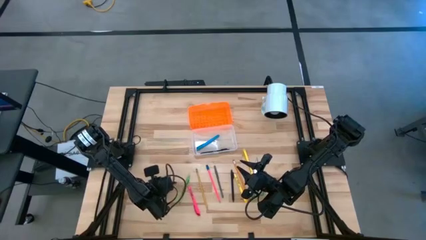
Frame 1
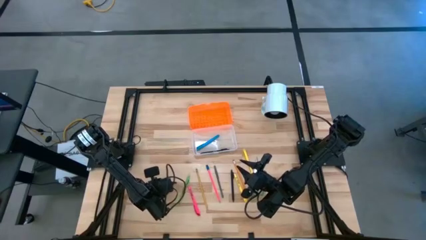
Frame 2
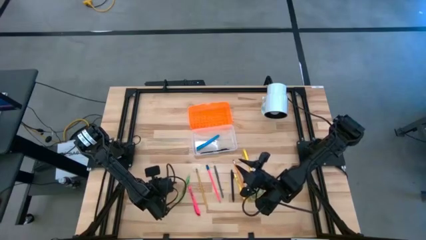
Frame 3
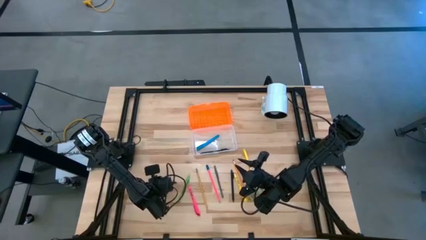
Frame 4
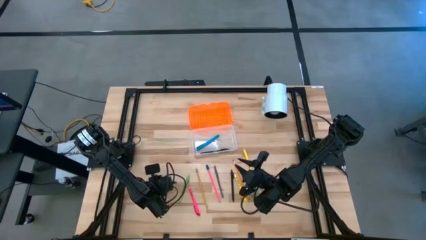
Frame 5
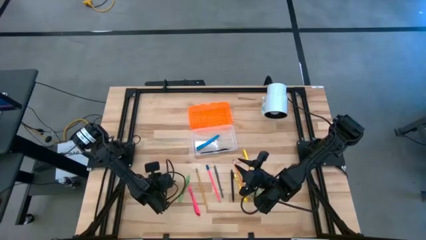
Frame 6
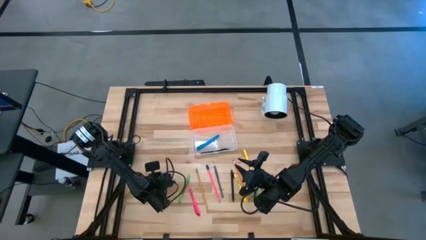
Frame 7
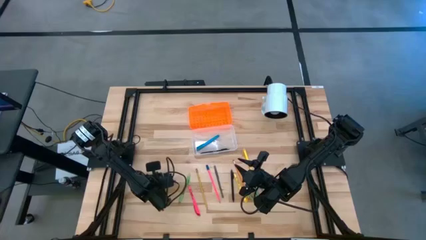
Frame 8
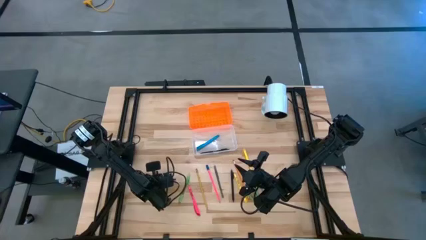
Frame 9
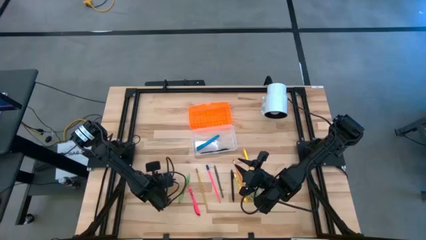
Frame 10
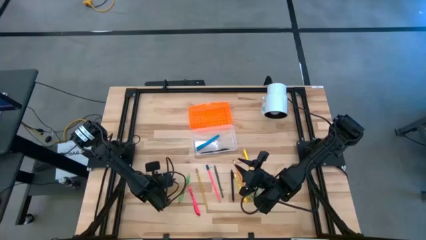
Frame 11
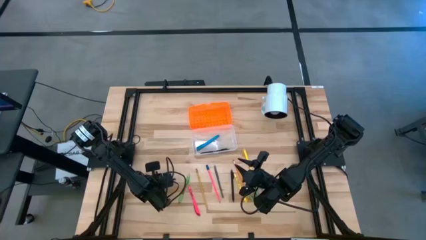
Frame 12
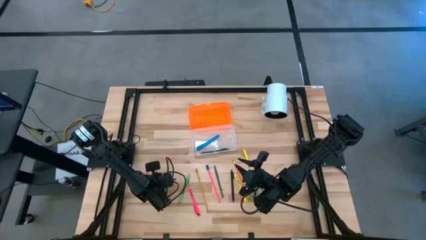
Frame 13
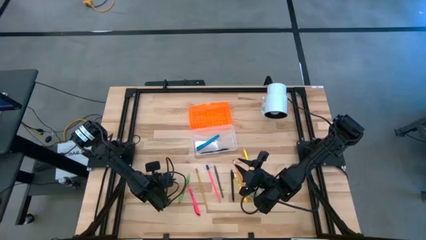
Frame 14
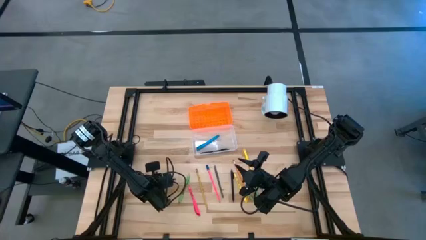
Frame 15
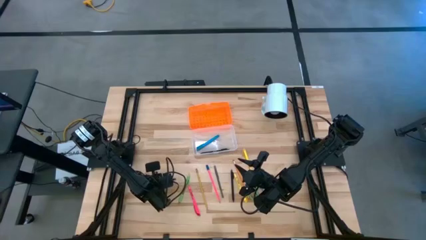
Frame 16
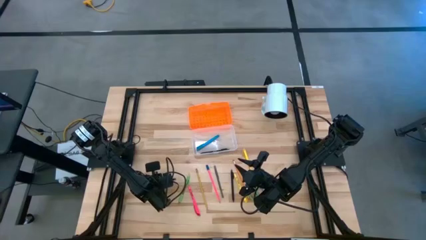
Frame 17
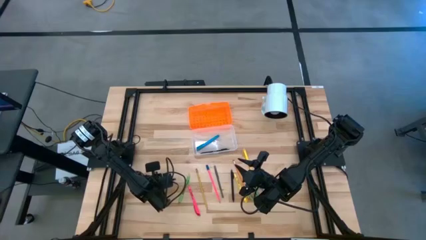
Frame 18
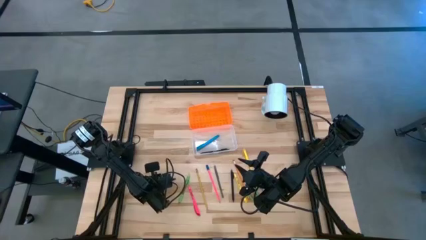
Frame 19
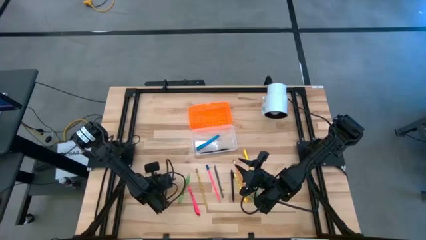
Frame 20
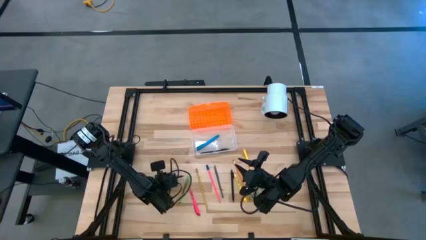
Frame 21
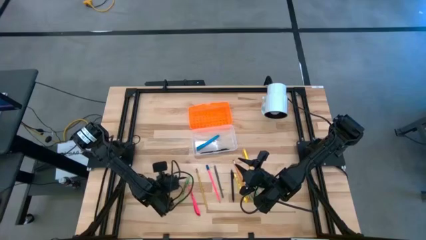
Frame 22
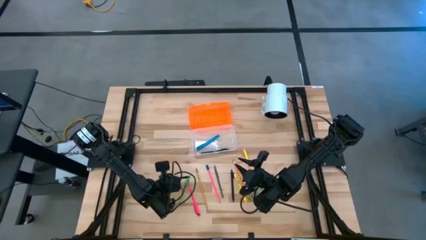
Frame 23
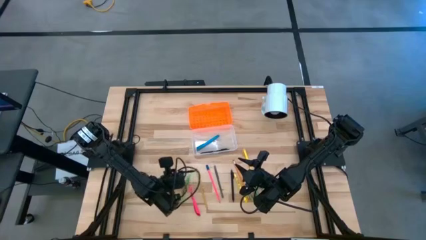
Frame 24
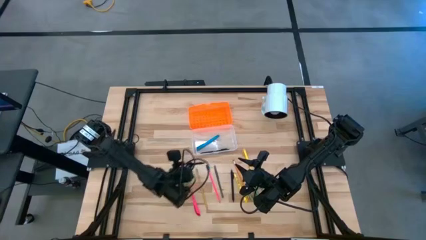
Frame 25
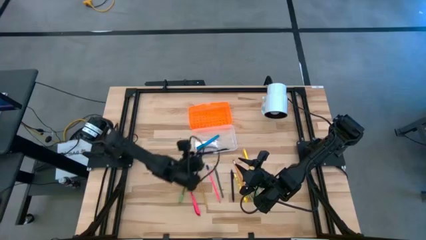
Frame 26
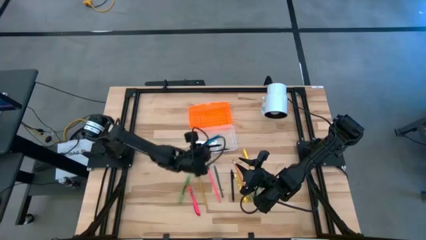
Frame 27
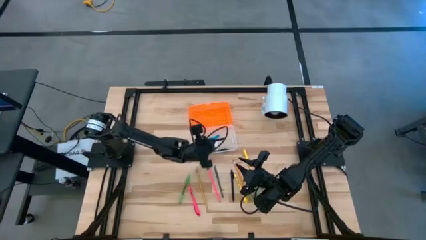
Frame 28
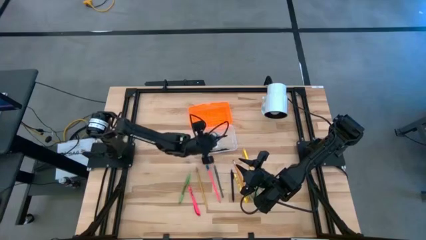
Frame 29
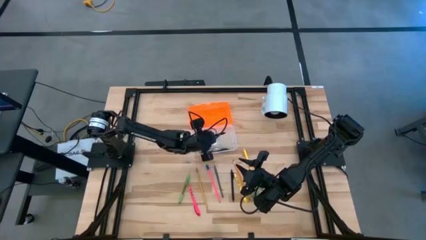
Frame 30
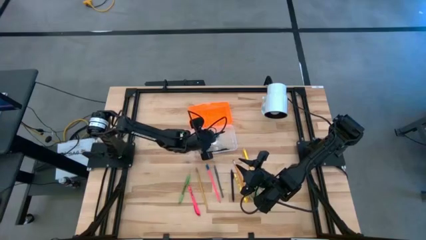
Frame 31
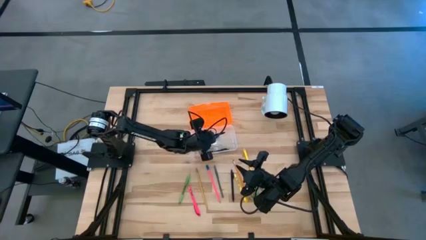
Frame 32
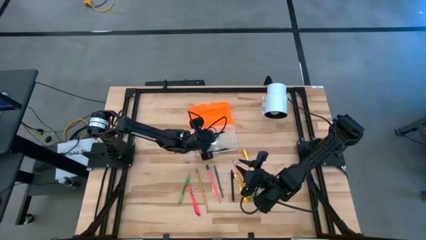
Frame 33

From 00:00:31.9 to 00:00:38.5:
Task: Pick & place school supplies into a supply box
Put the left black pen into the supply box

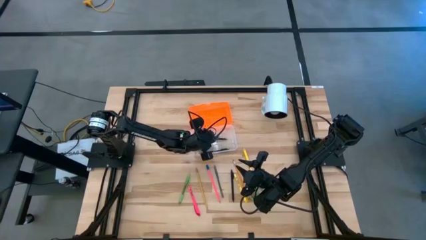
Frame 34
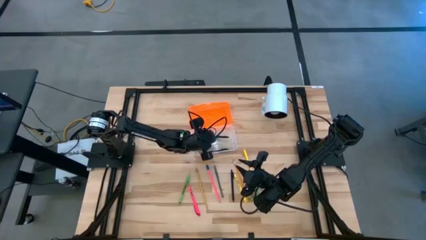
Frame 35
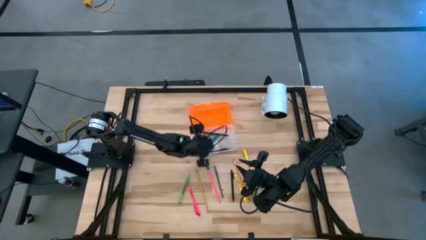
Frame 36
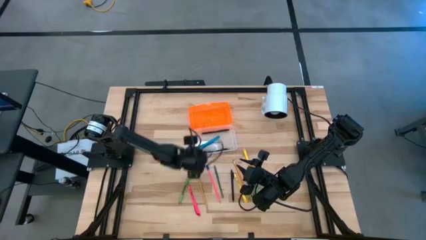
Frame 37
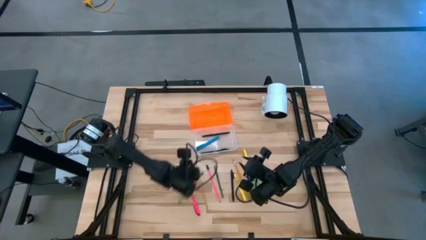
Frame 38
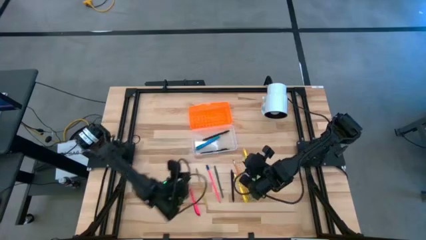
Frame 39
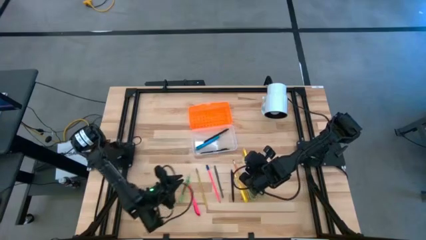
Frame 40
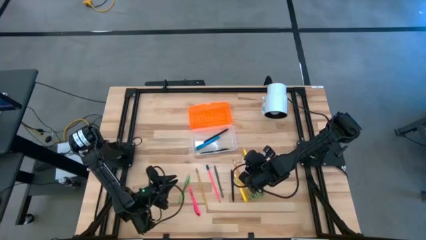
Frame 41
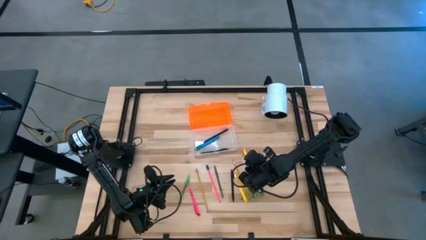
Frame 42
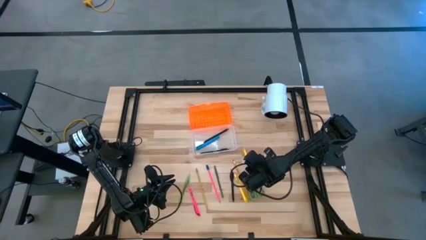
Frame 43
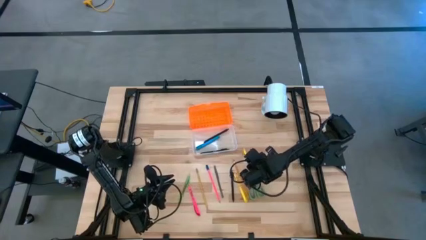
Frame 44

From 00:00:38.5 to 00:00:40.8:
Put the right yellow pen into the supply box

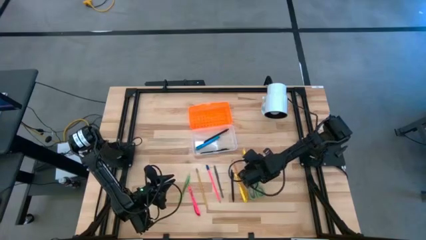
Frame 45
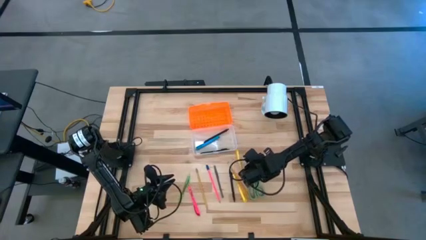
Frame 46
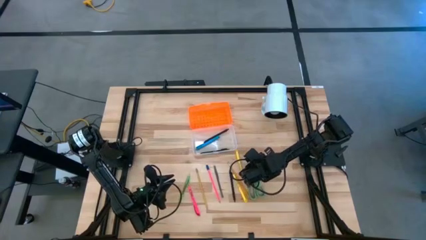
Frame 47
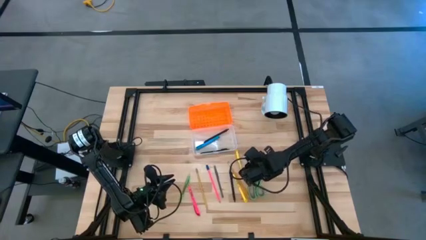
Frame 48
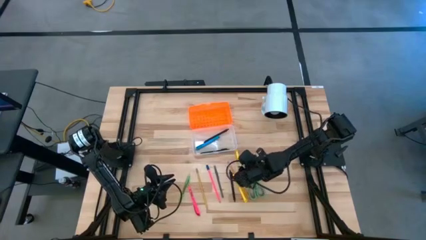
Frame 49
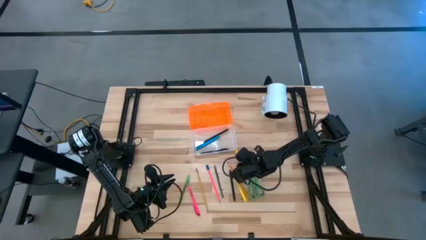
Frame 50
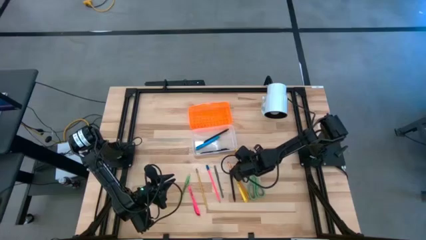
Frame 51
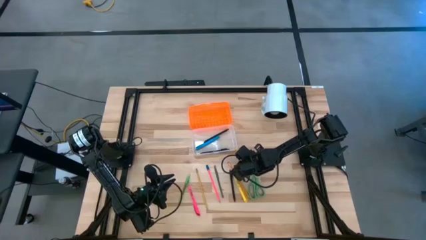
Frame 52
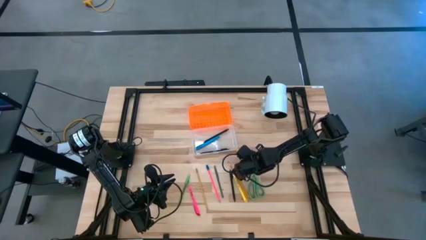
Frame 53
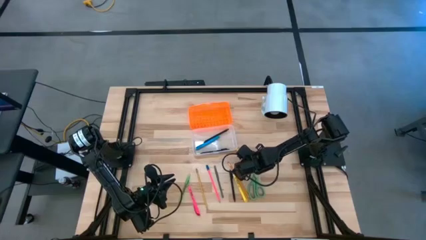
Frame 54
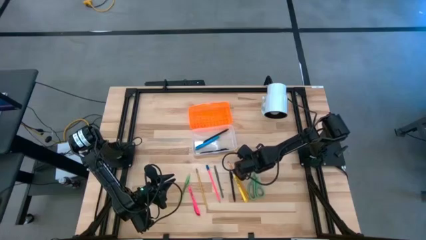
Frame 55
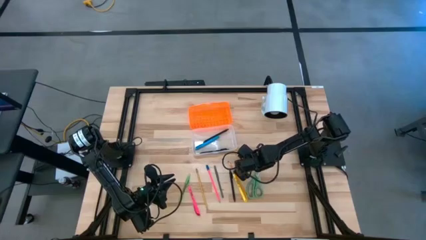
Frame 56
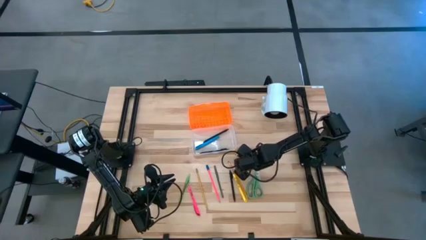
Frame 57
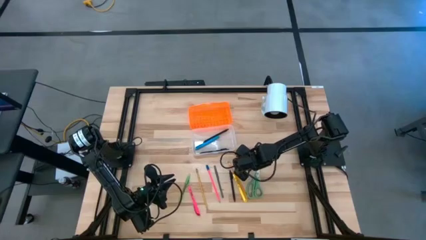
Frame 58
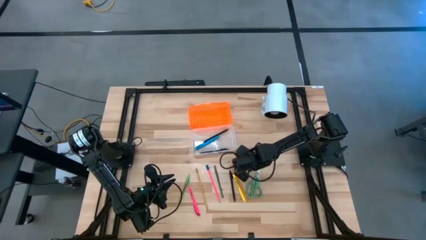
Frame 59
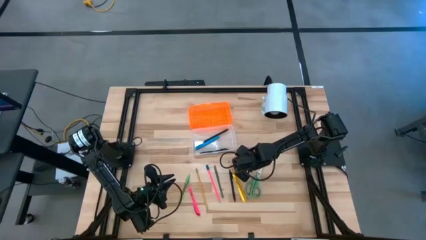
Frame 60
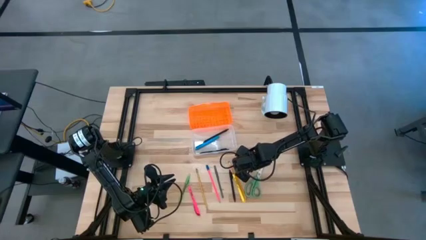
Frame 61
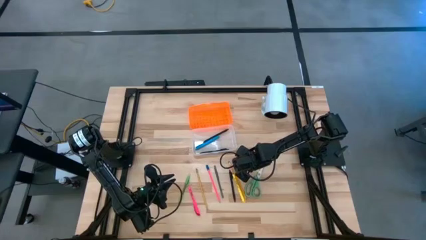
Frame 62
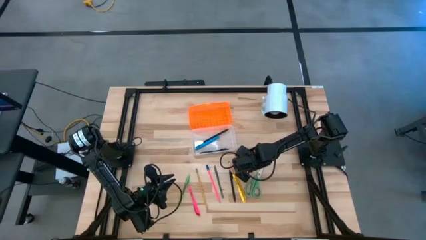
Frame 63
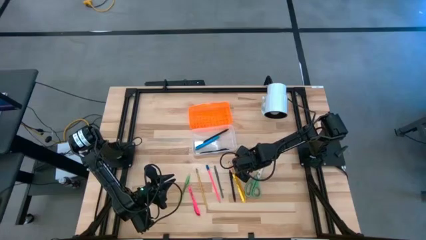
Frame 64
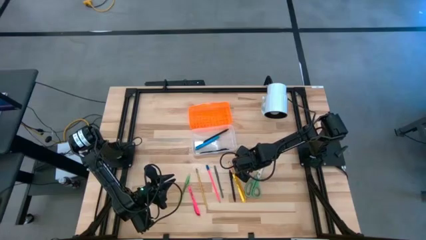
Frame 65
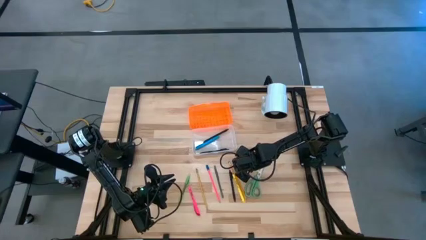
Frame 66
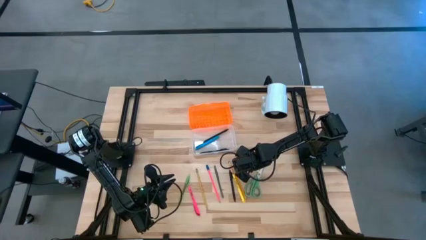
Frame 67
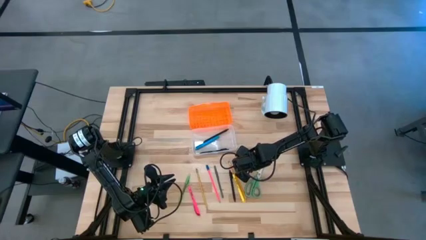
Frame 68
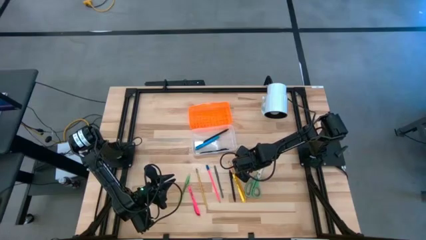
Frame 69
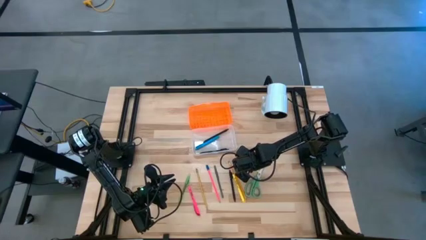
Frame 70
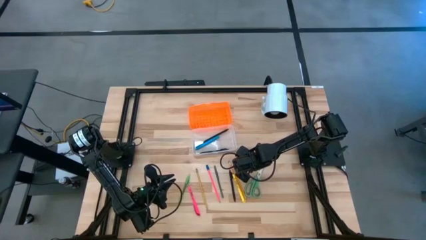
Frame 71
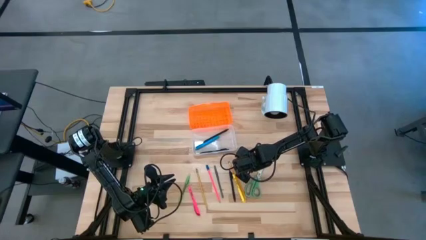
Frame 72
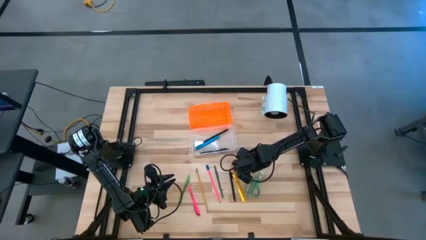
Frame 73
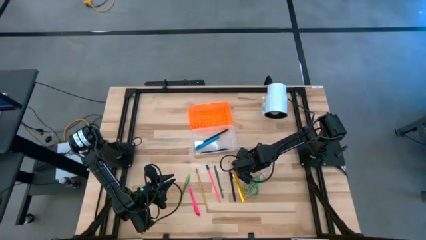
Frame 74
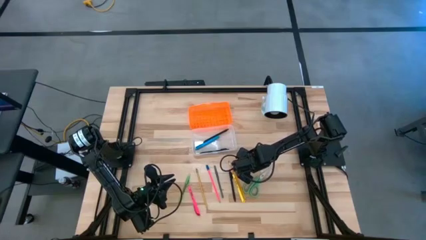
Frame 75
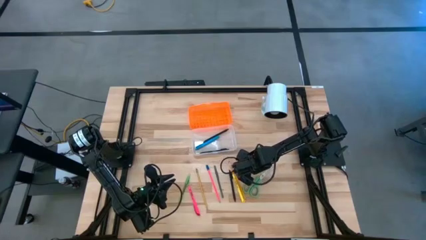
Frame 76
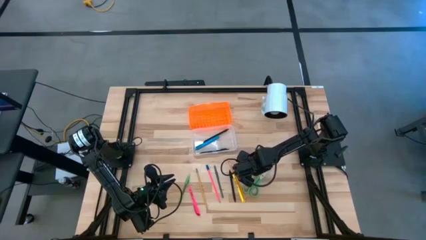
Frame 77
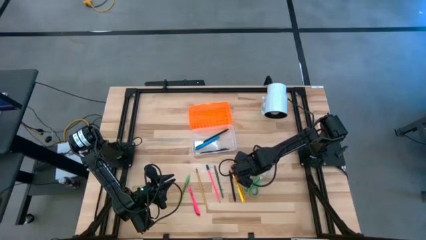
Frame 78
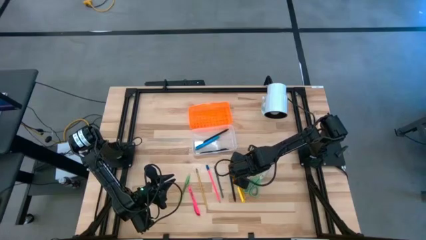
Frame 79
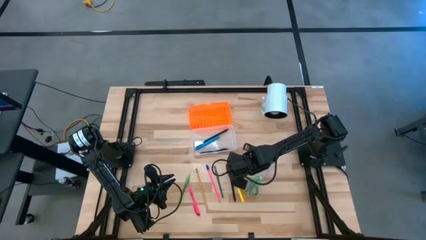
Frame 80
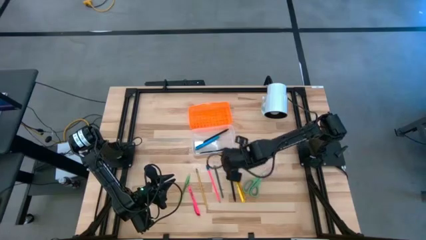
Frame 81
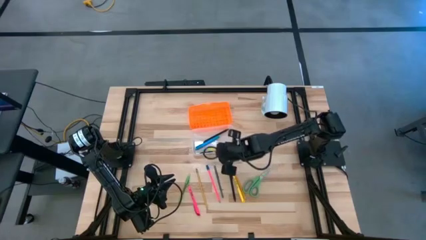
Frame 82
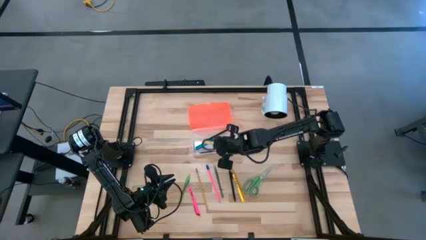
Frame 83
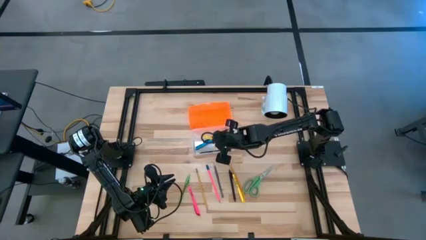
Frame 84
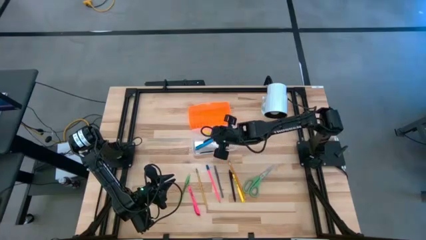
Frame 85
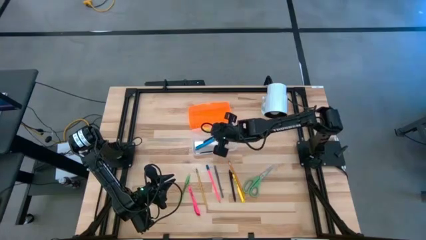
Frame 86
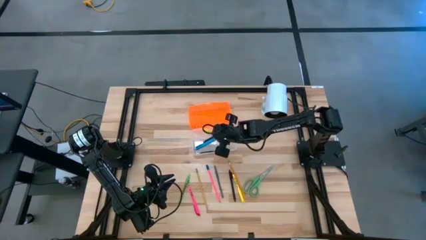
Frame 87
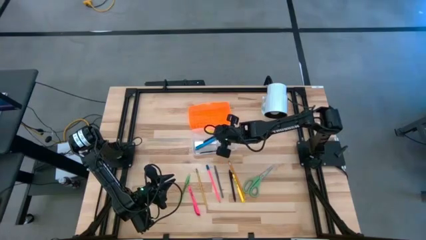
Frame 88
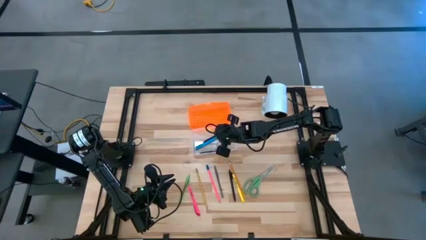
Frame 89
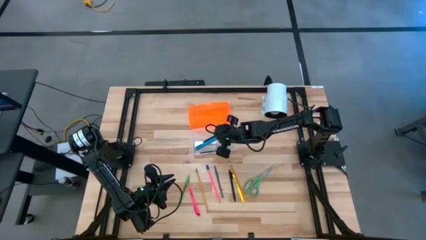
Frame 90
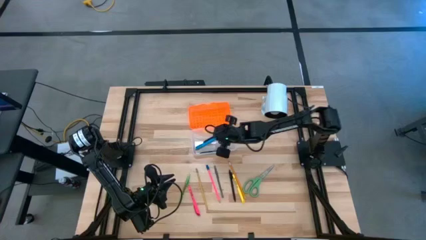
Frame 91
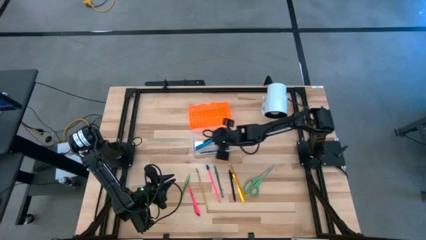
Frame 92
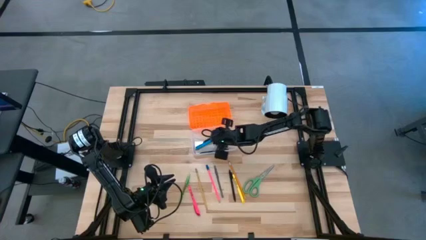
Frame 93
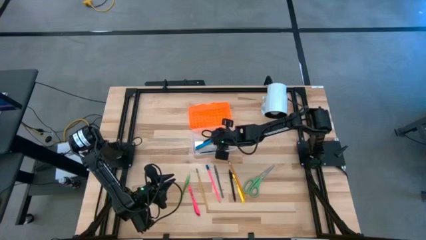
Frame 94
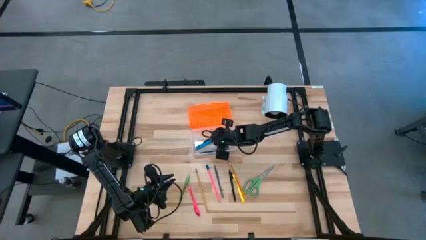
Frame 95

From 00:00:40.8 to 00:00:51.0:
Put the right yellow pen into the supply box
